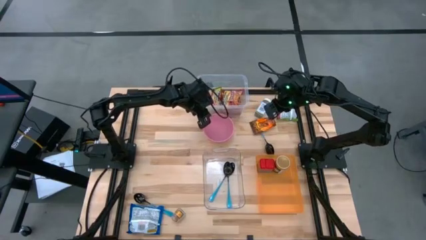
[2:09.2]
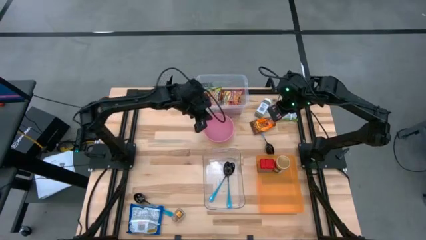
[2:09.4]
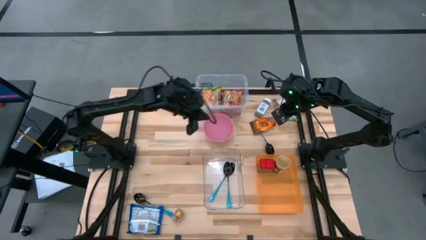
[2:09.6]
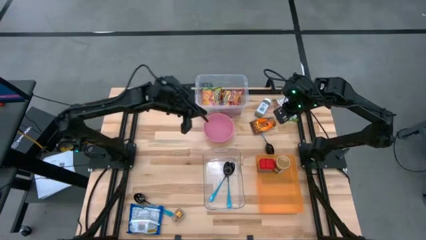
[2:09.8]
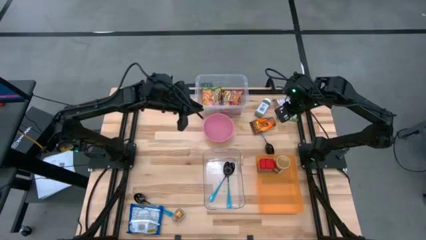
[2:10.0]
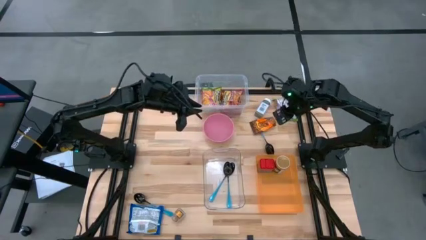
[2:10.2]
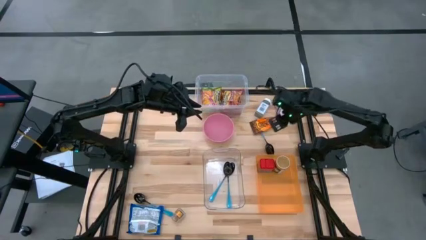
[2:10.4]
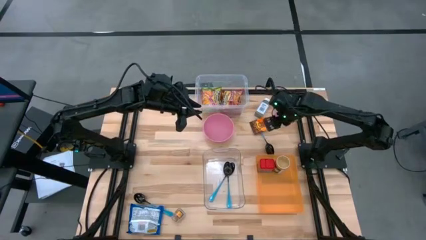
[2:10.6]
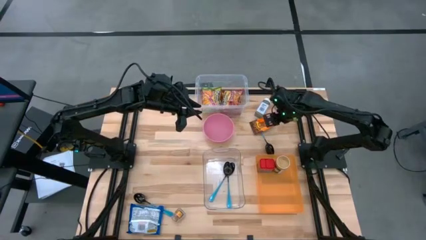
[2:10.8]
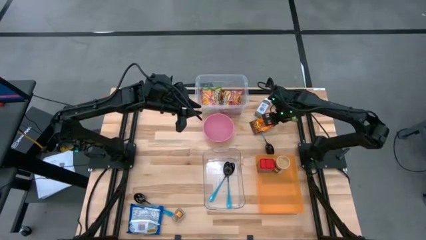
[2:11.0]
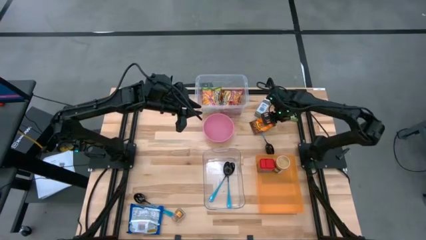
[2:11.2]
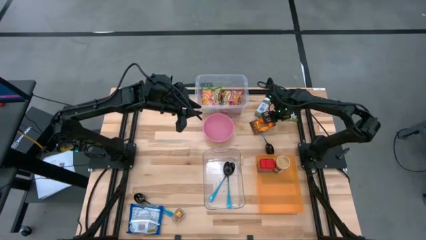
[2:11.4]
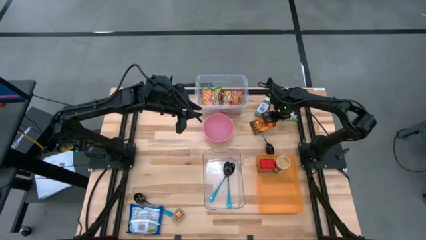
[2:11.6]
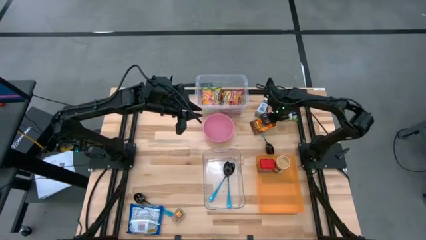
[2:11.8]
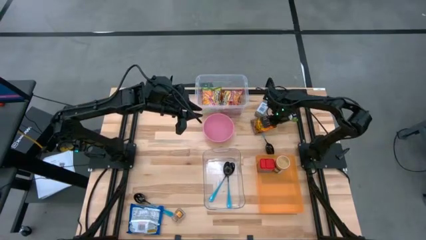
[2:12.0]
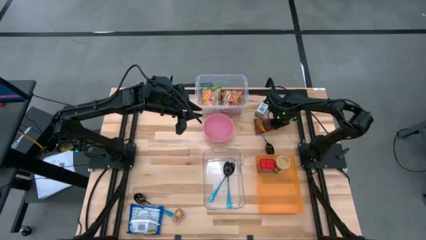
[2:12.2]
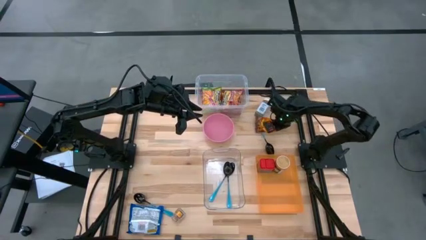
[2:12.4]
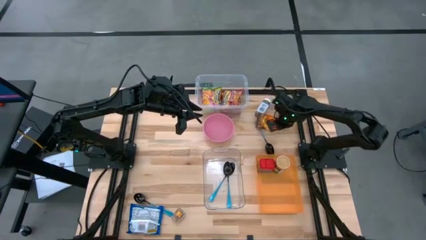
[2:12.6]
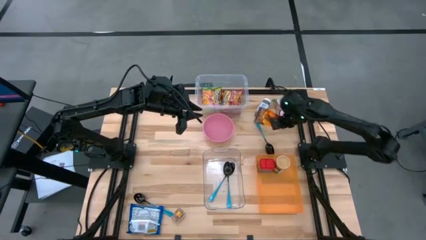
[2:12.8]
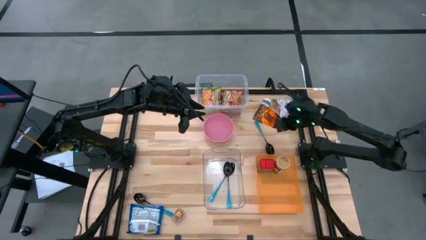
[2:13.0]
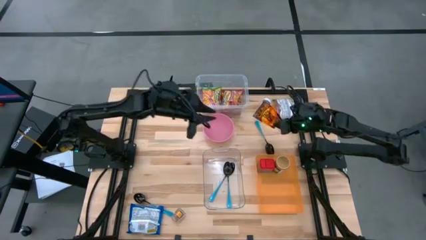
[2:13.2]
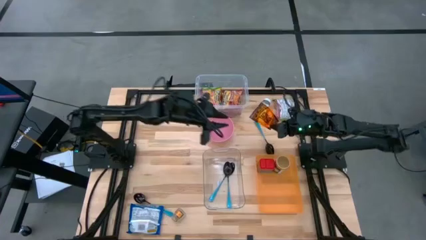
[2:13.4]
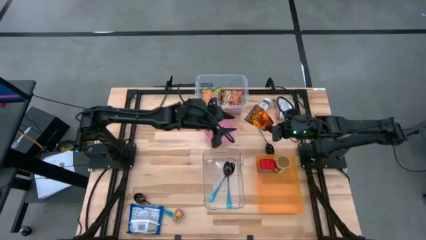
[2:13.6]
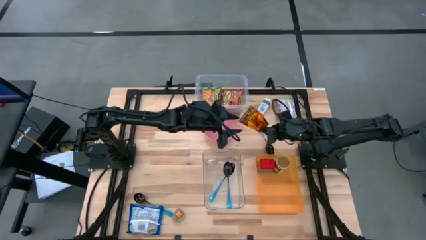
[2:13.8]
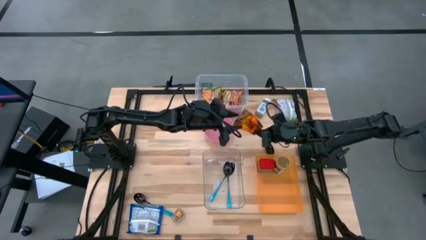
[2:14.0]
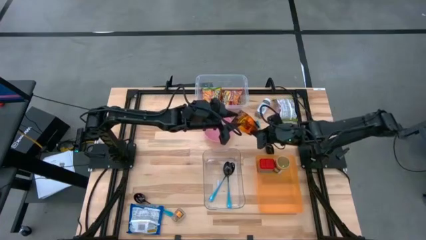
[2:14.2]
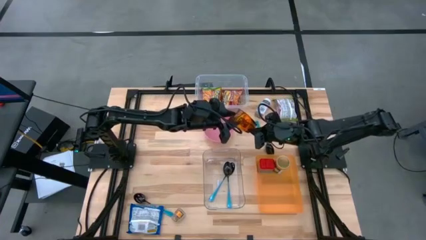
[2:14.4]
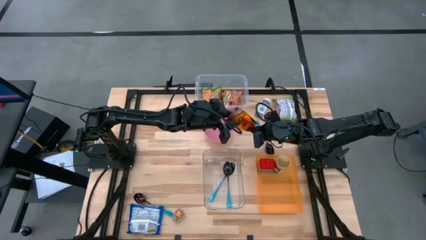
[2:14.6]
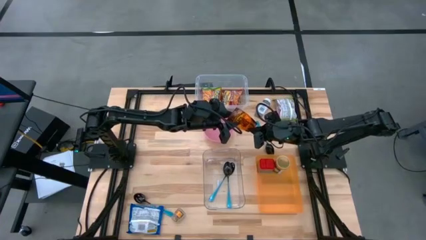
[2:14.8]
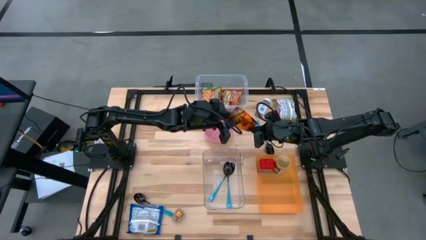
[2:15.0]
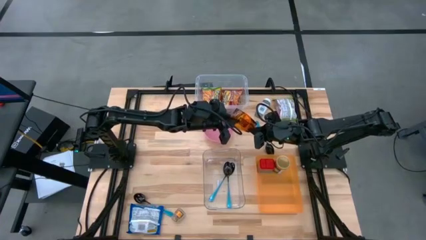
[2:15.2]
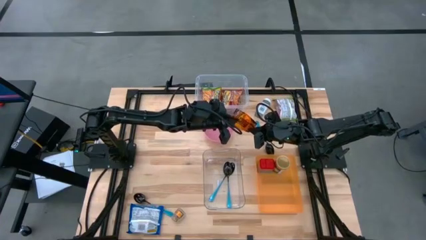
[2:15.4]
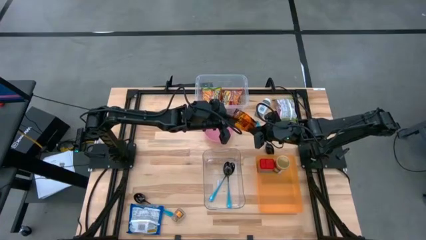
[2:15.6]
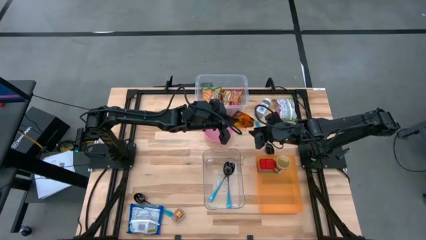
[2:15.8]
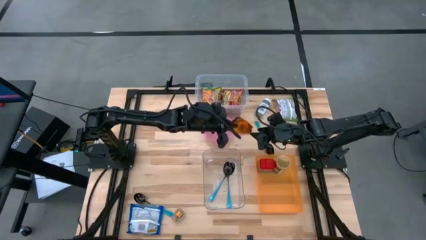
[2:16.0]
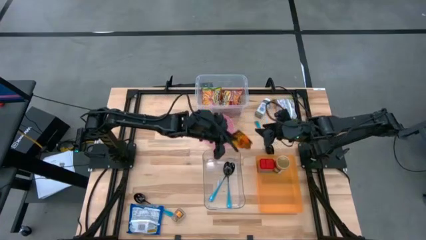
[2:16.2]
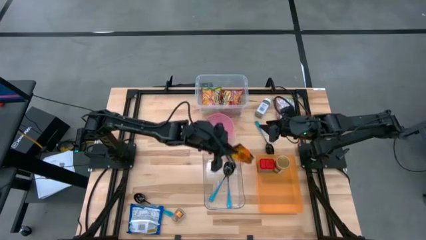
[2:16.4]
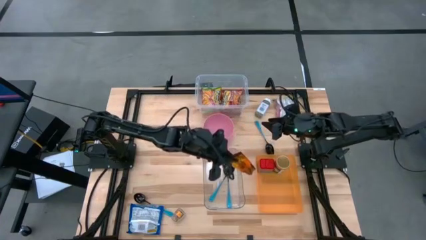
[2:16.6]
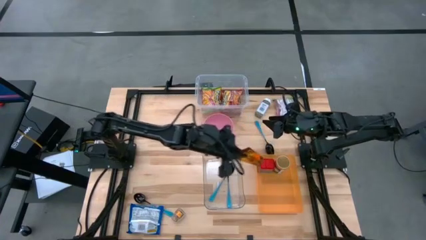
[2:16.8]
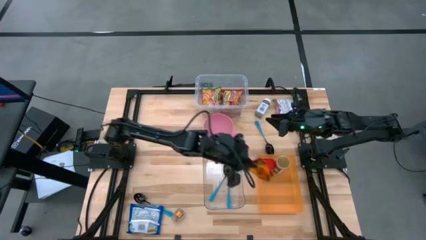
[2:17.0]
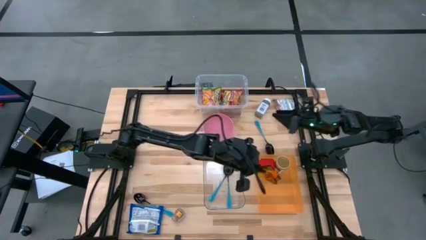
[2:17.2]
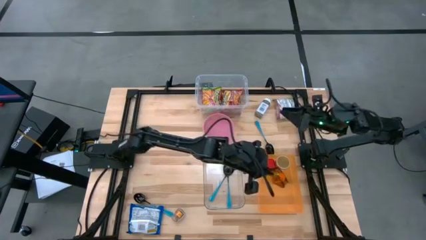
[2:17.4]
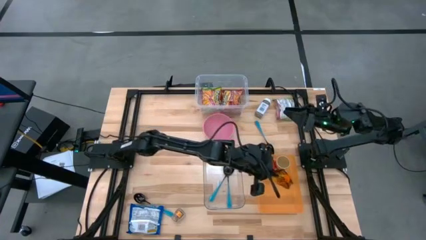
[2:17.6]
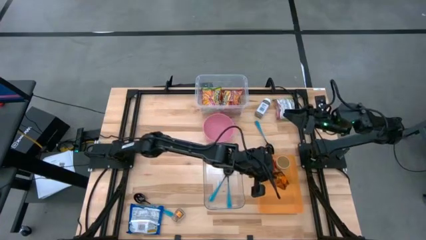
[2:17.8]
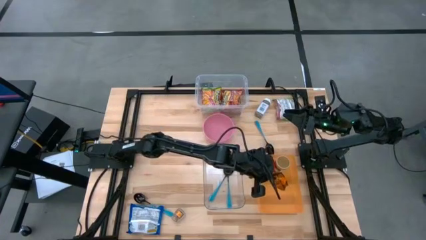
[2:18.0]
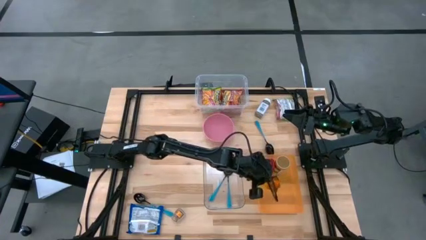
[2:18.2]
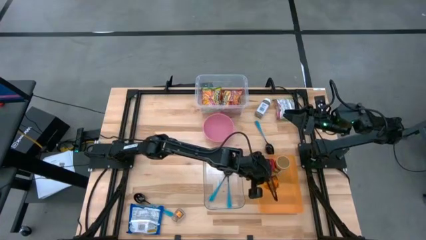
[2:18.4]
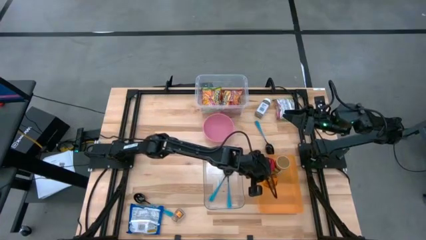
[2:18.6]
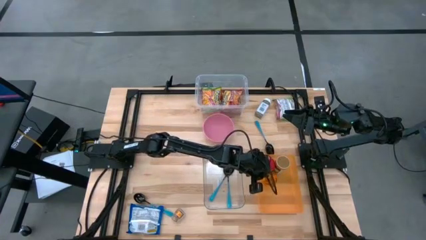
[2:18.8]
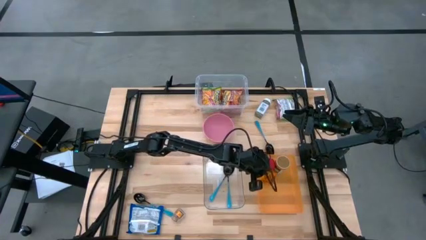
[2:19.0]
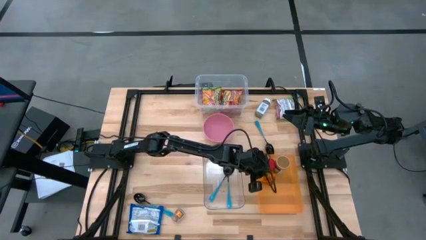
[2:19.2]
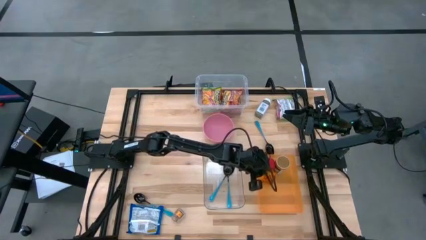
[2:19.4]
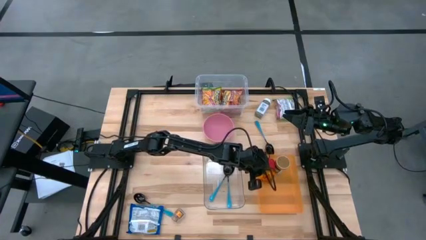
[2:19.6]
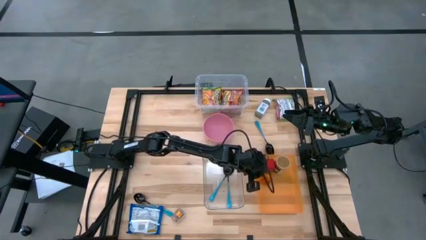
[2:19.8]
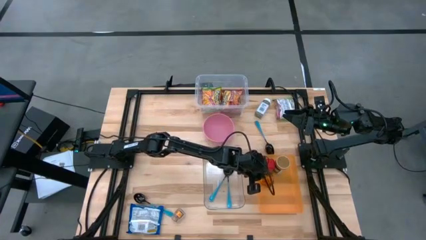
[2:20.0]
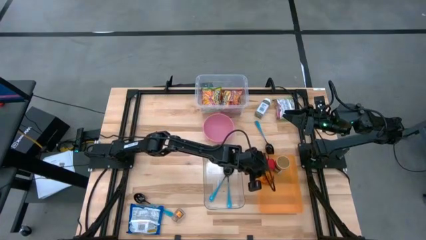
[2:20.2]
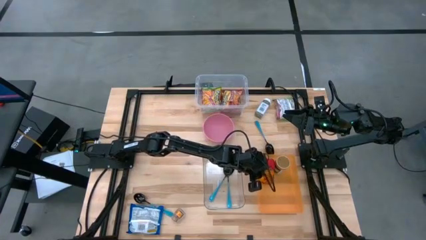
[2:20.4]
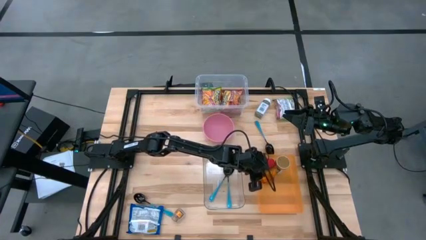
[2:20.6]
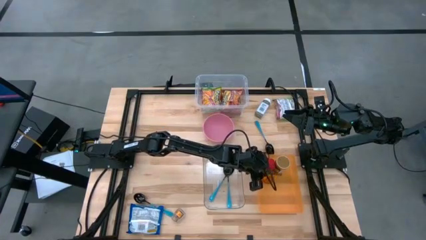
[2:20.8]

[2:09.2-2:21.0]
Task: Pick & Place Food Item
Put the orange seasoning pack into the orange bin

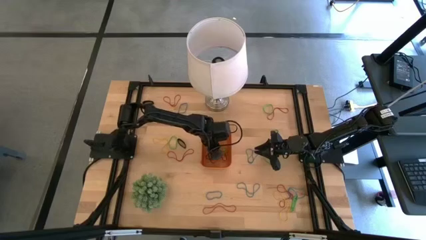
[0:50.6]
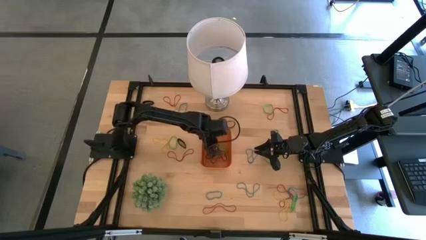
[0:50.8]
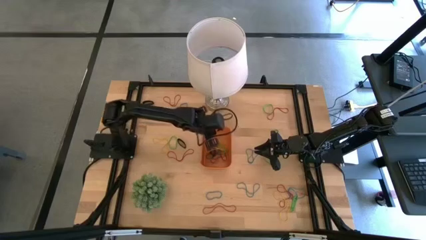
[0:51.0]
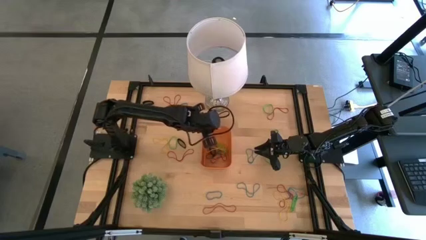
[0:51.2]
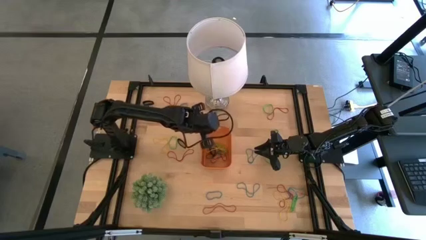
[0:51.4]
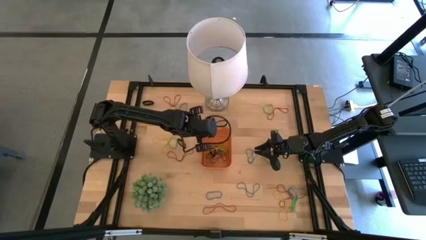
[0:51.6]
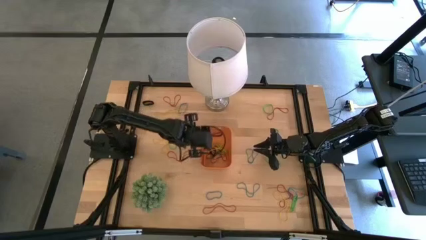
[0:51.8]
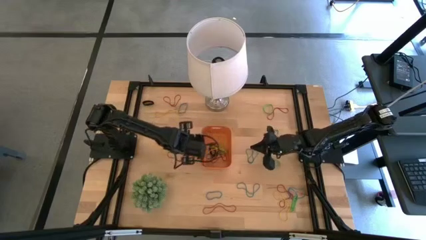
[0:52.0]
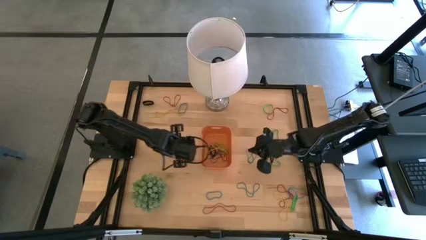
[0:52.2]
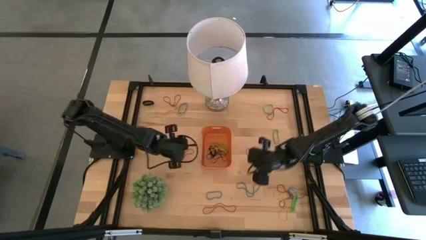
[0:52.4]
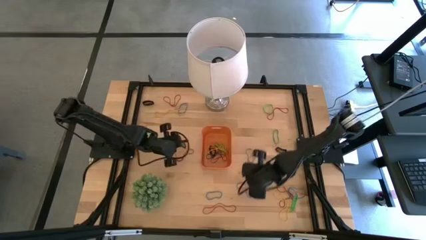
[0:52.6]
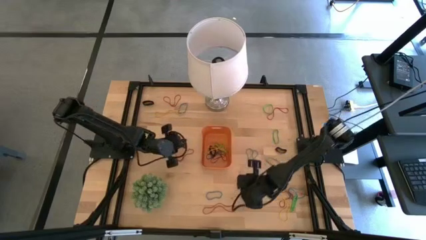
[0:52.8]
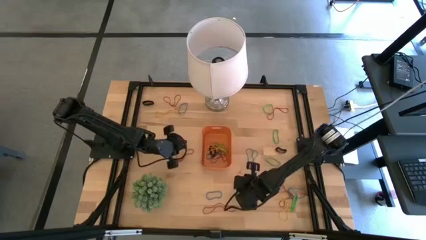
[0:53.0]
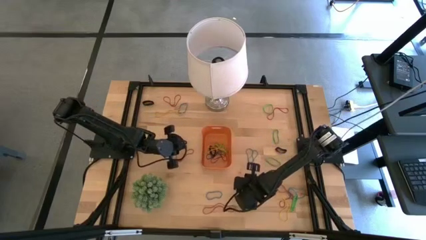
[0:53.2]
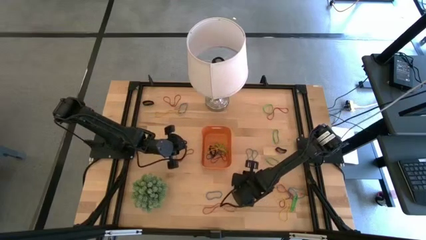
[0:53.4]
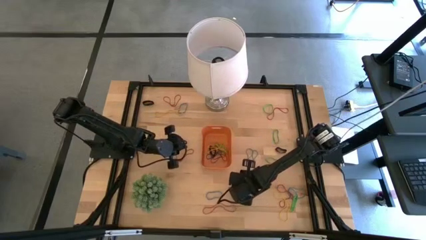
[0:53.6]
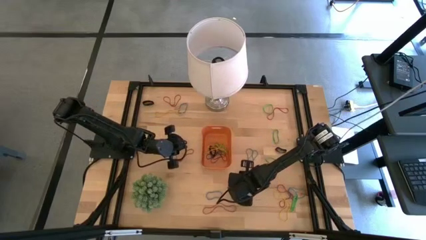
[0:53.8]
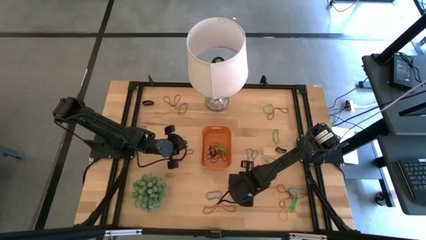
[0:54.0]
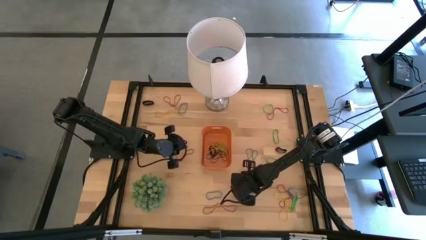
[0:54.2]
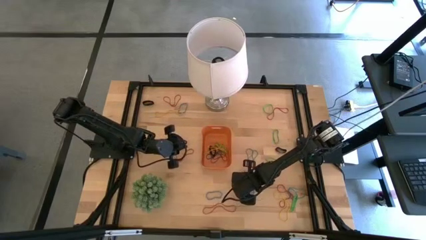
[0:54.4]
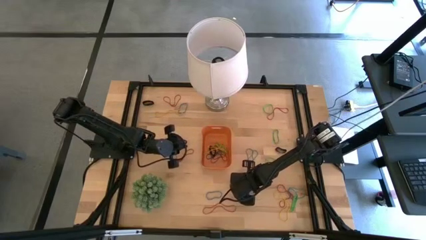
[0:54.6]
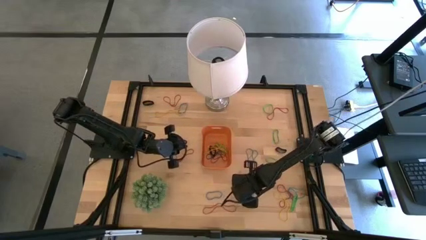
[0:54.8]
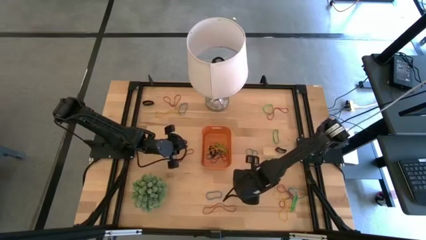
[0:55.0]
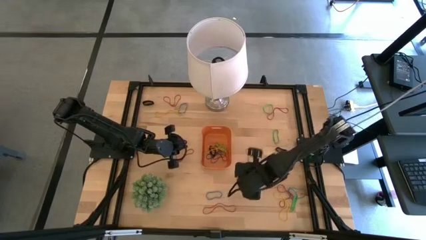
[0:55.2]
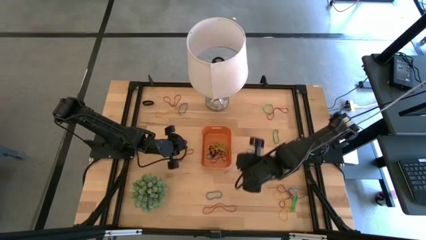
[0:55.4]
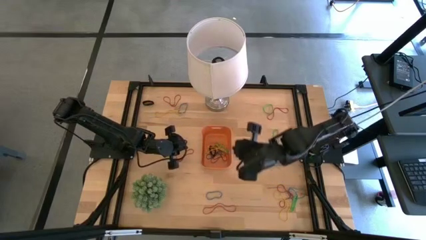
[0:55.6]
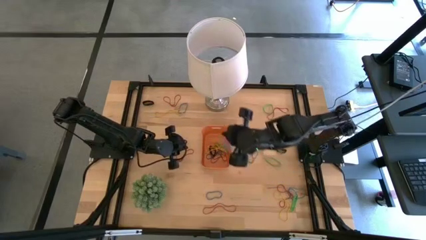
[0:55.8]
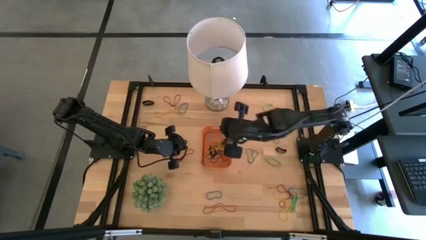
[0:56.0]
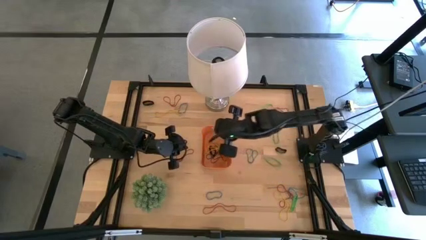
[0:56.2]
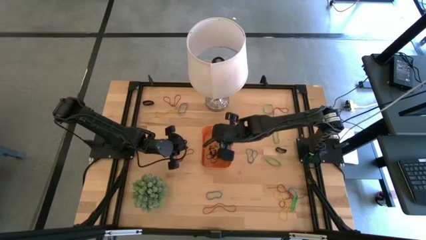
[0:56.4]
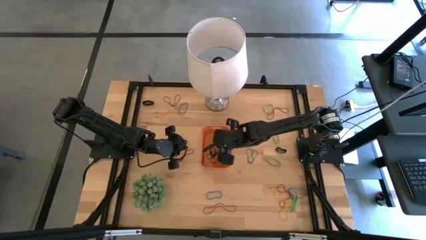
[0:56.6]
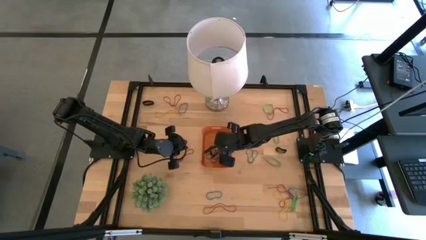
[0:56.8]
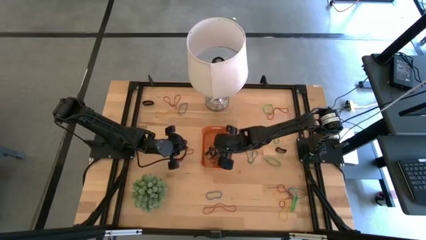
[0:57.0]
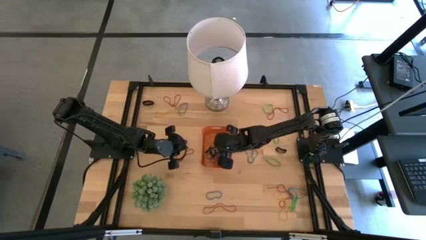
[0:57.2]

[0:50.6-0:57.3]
Task: Pick and place rubber bands into bin
Put the blue rubber band into the orange bin
